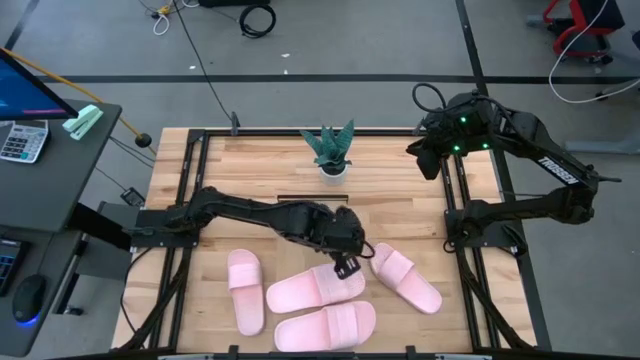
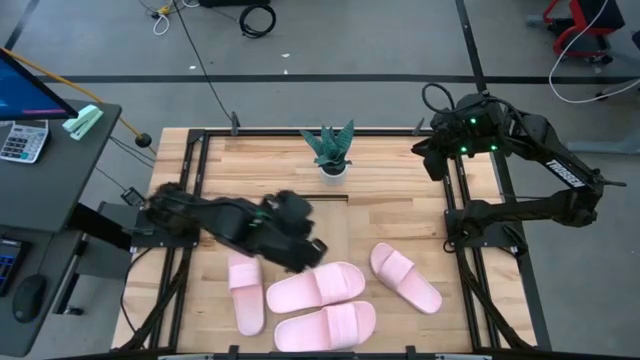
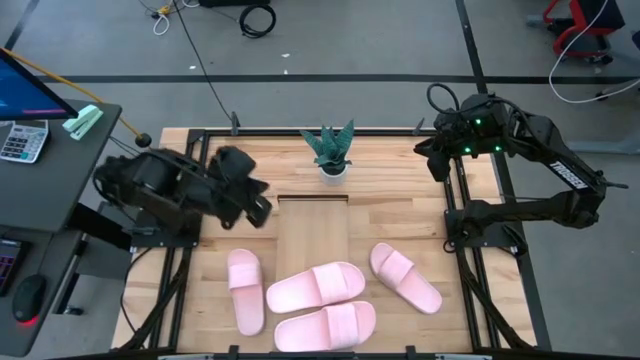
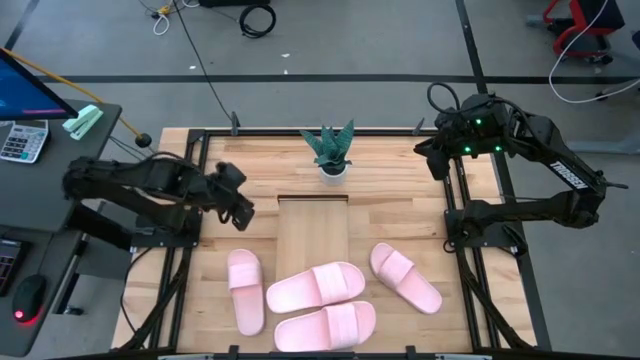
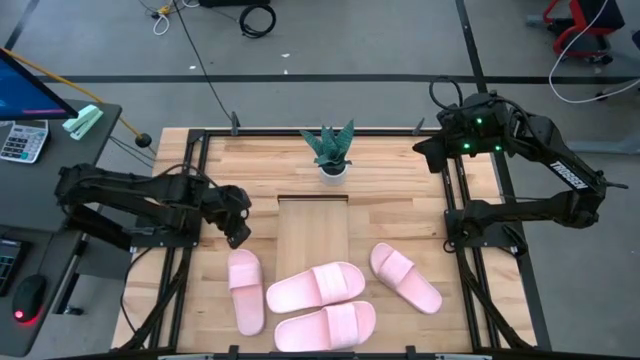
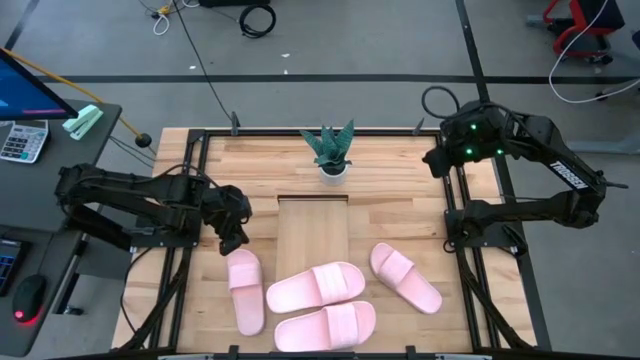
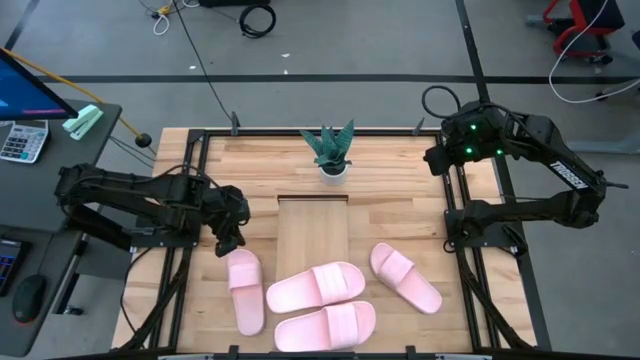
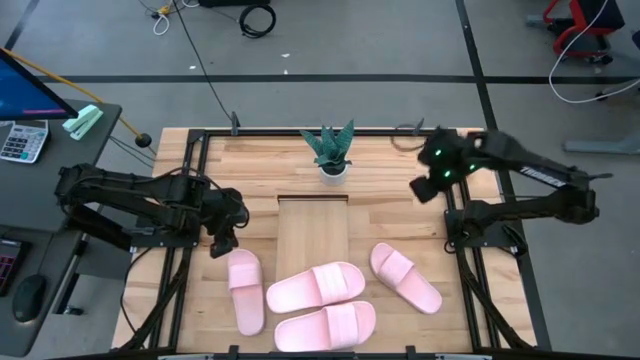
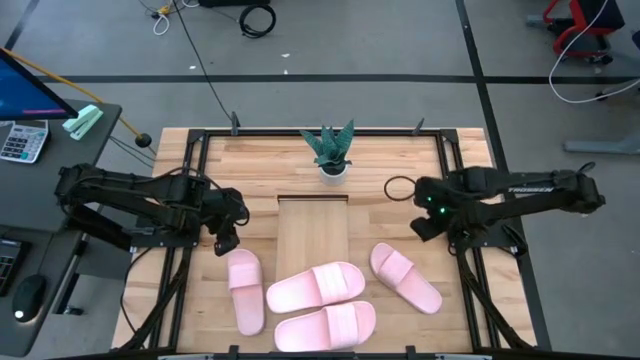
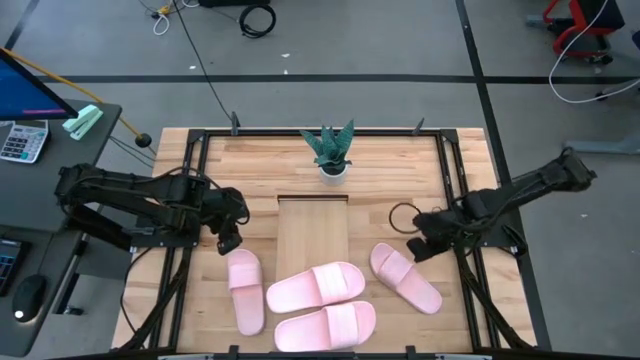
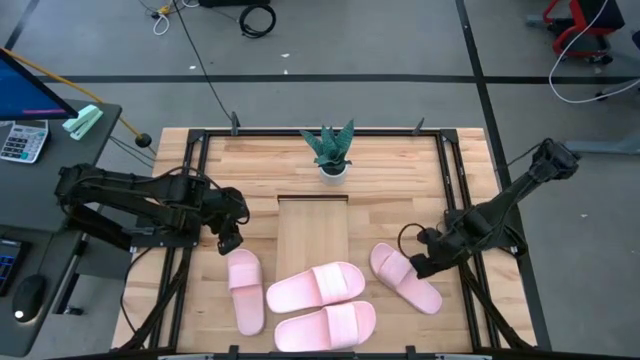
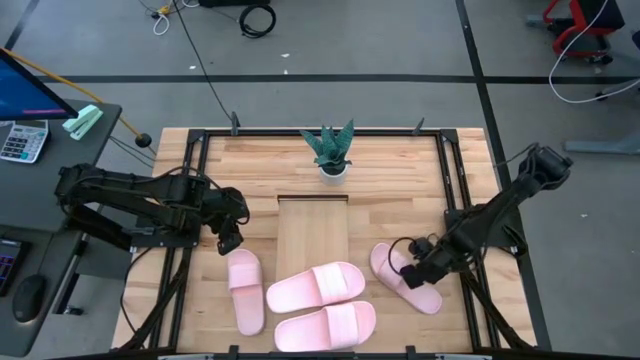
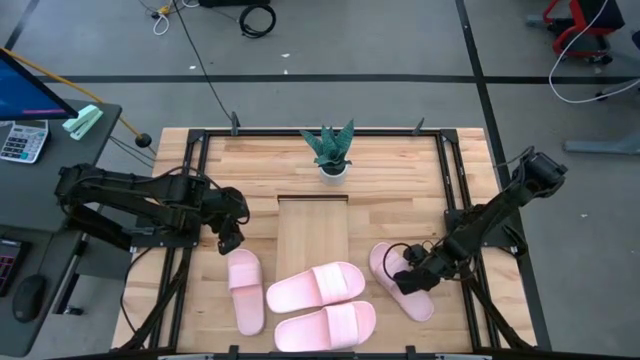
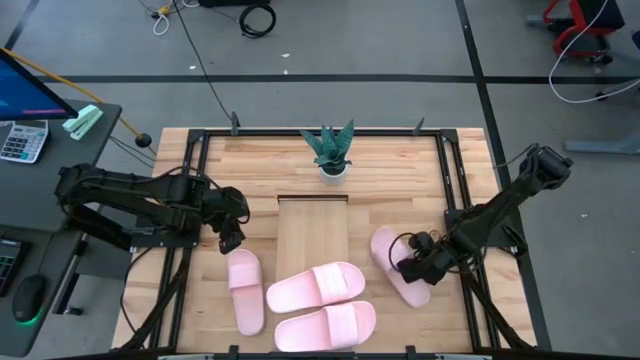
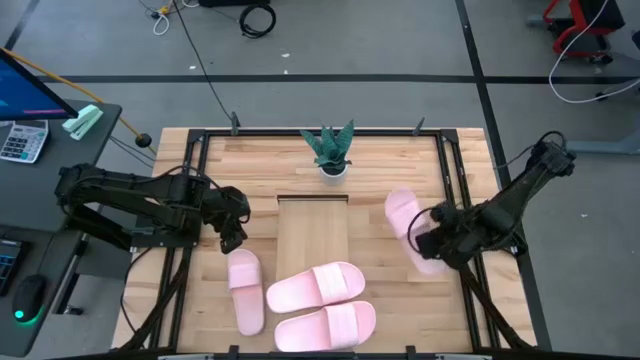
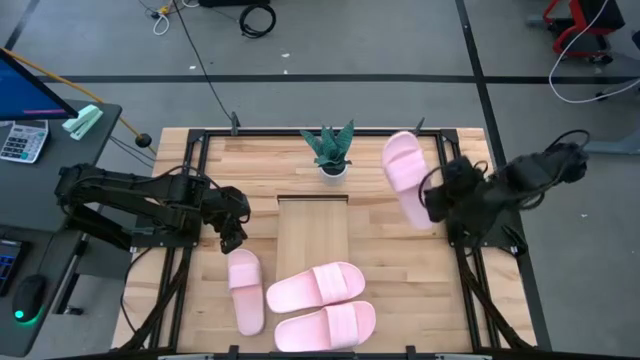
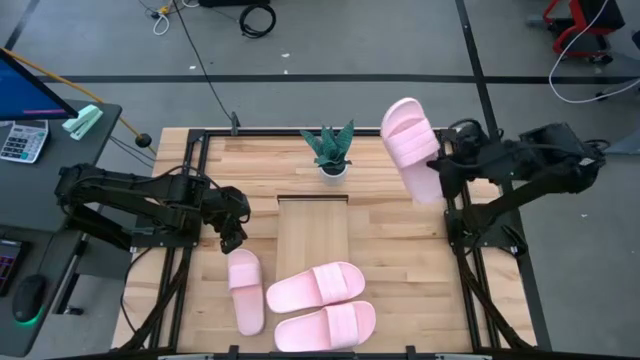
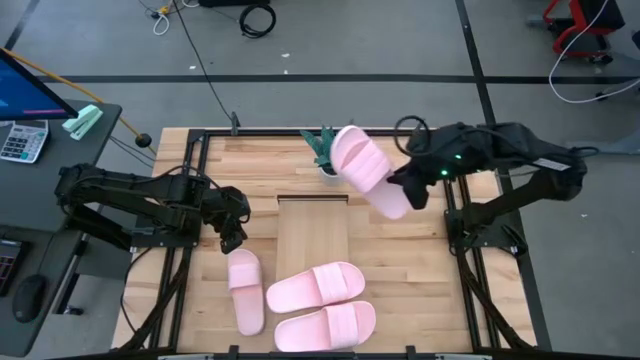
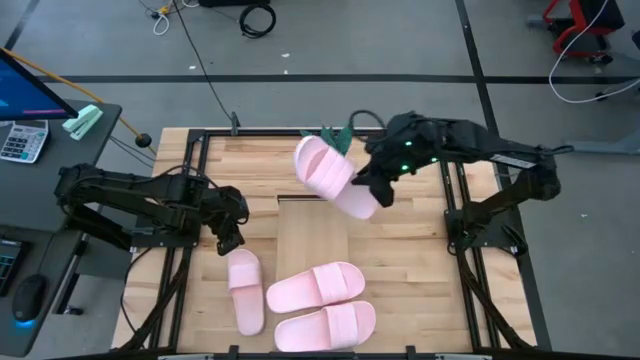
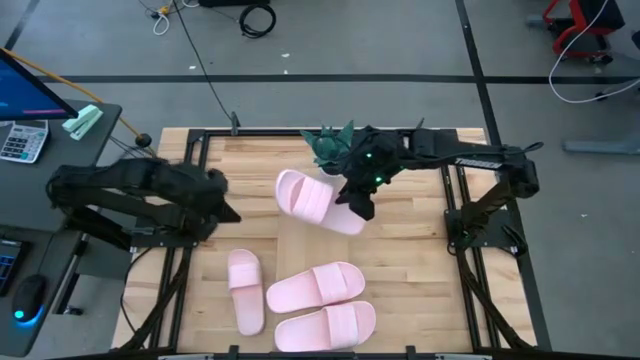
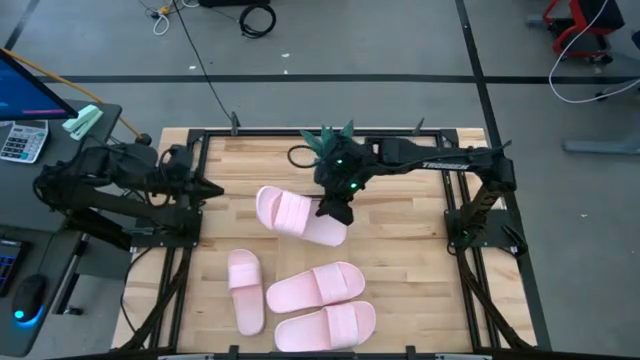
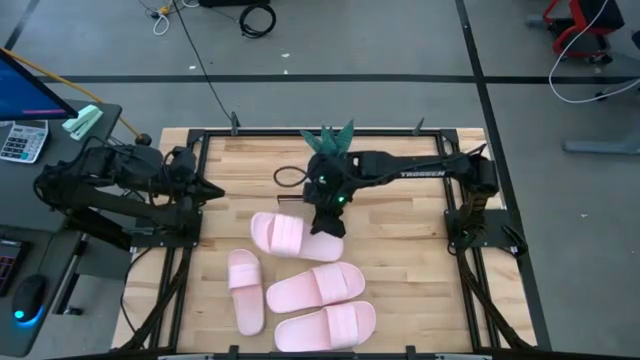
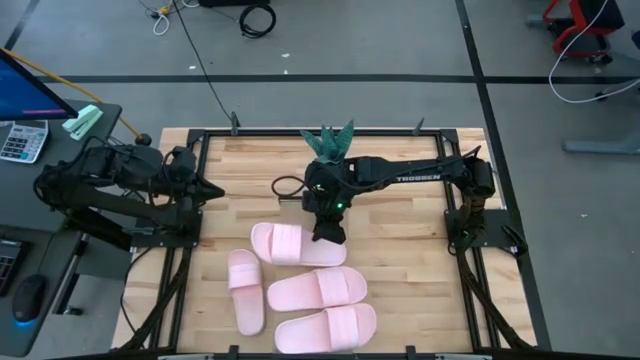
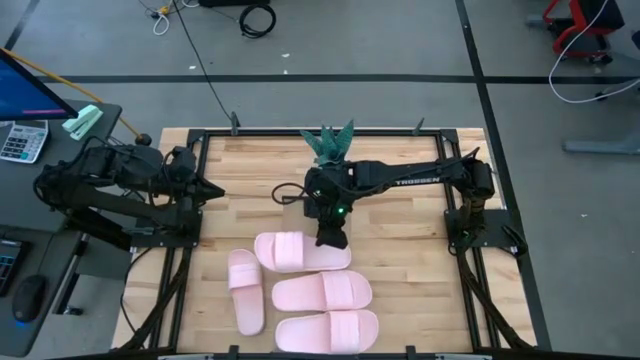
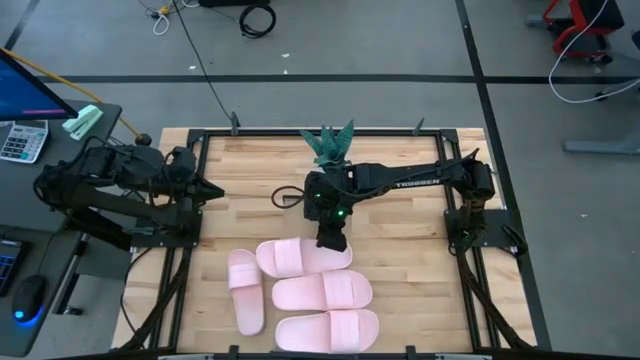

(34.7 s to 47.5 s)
Task: Pick and place slides into the shelf
Put the right pink slide on the shelf

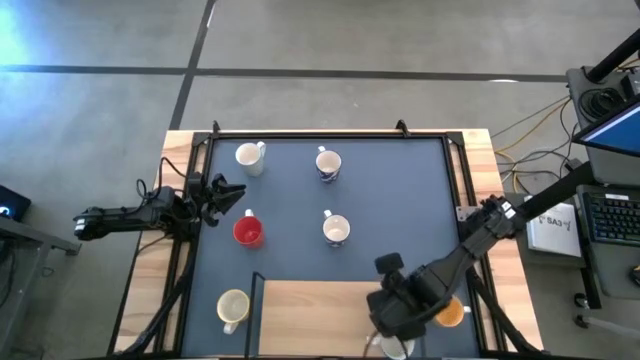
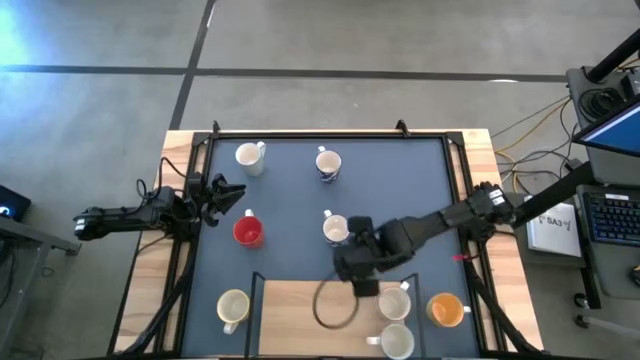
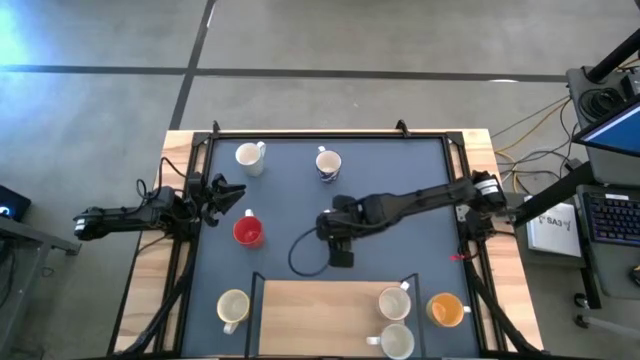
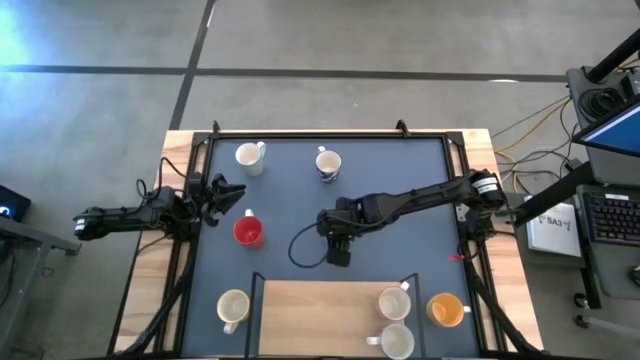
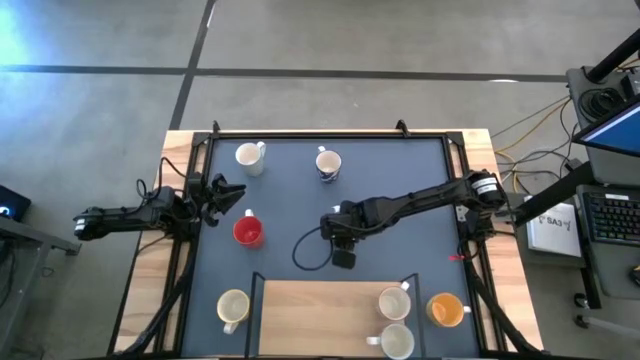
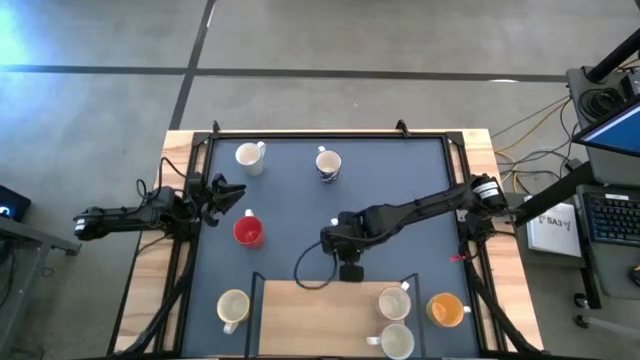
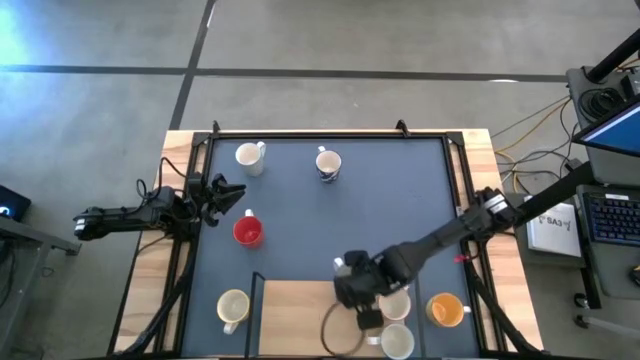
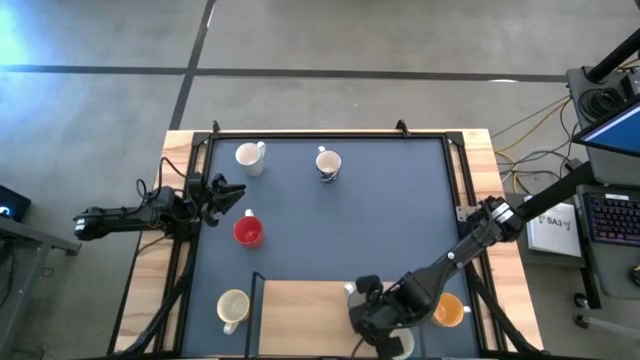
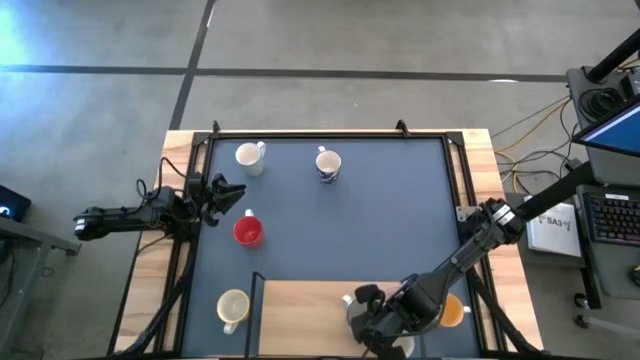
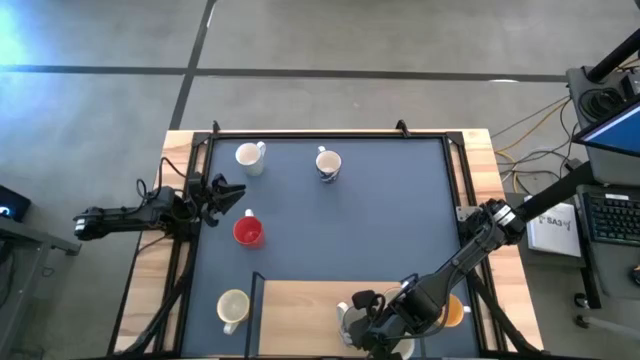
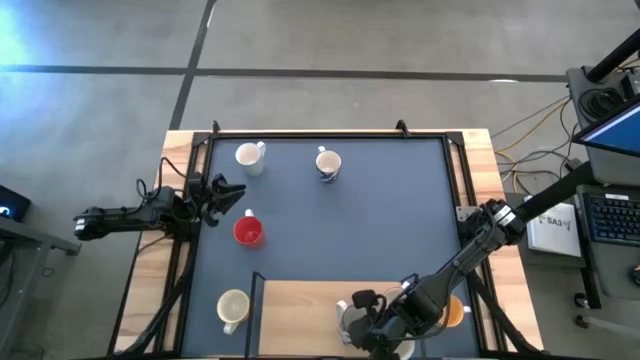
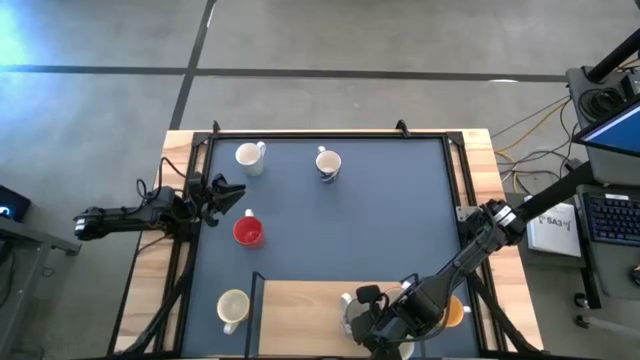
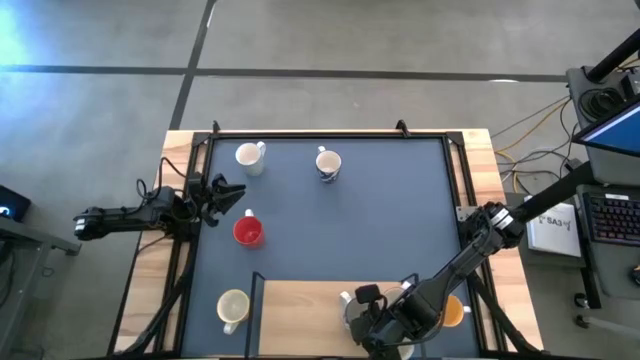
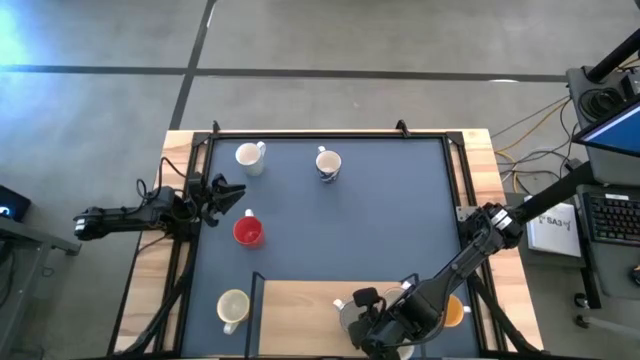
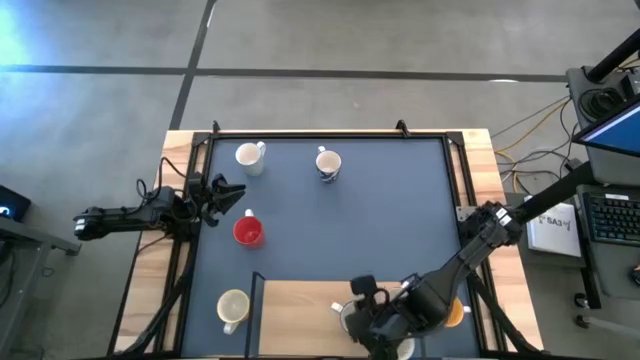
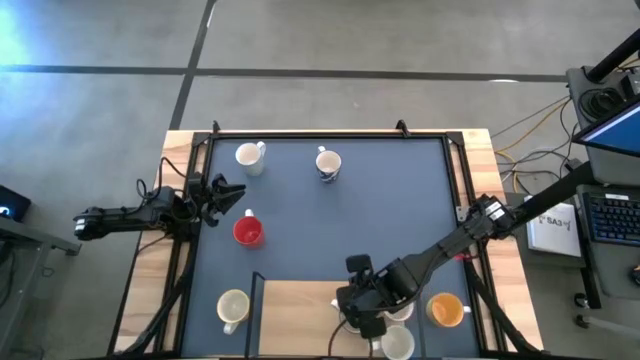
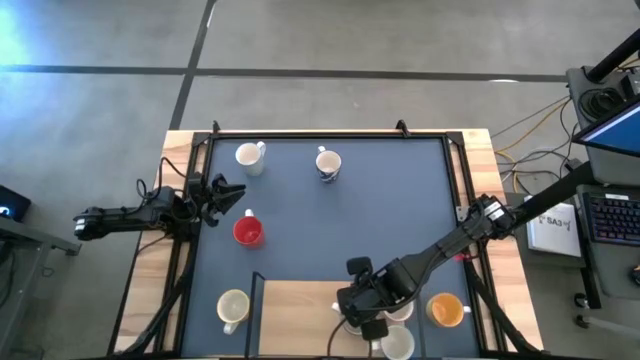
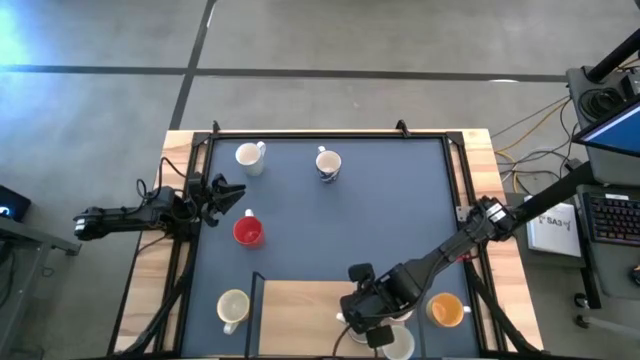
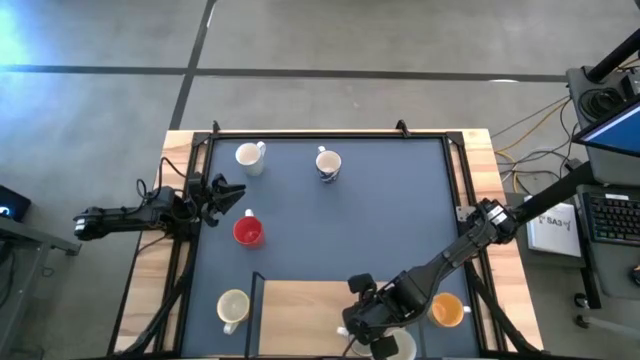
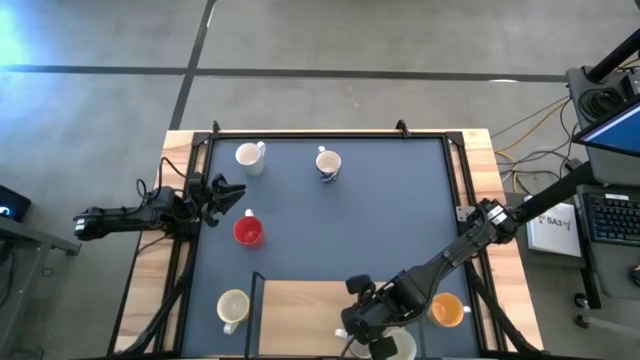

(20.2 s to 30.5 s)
Task: Place coffee mugs
Put the bottom blue patterned mug on the shelf
